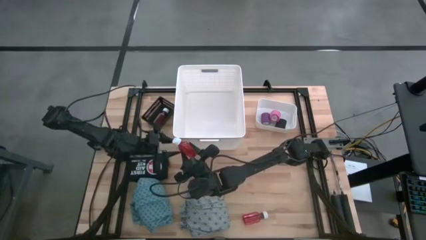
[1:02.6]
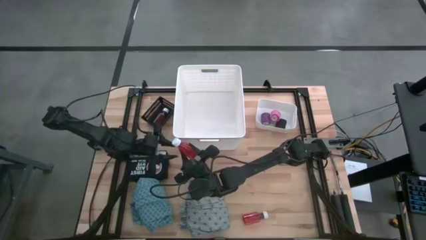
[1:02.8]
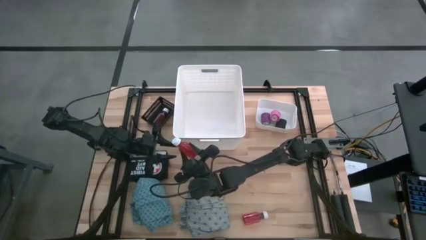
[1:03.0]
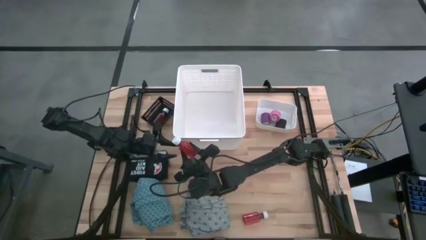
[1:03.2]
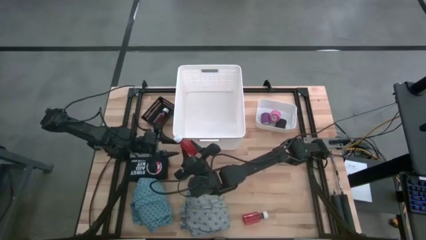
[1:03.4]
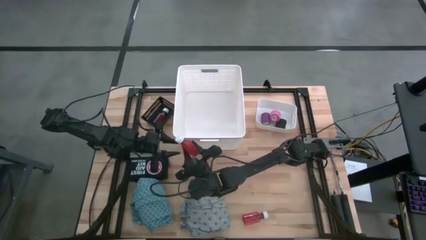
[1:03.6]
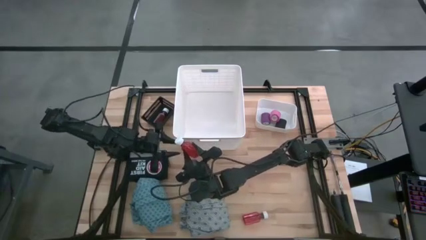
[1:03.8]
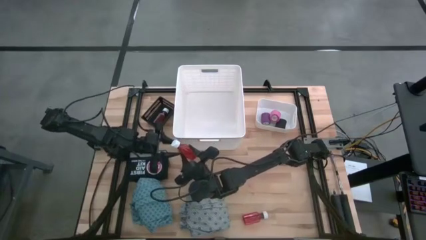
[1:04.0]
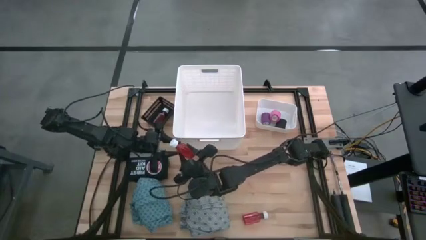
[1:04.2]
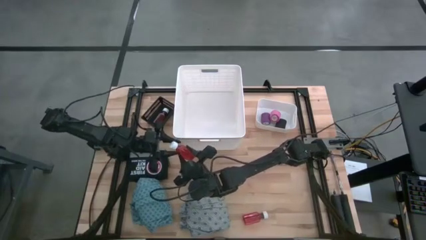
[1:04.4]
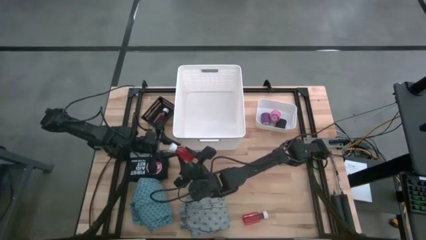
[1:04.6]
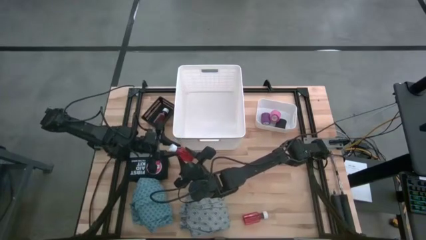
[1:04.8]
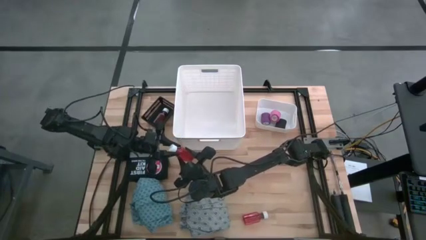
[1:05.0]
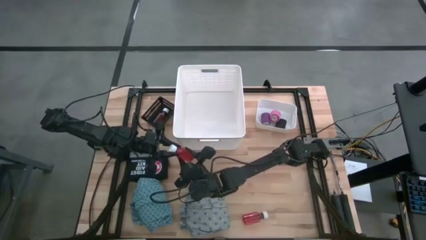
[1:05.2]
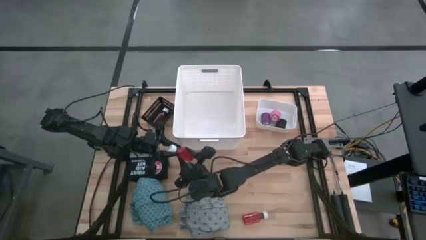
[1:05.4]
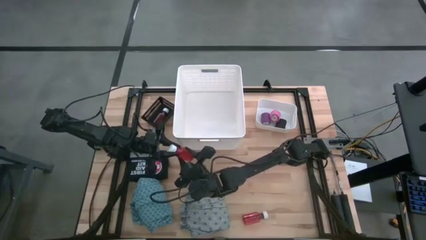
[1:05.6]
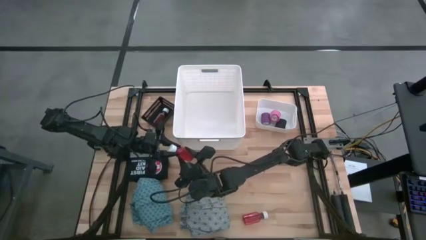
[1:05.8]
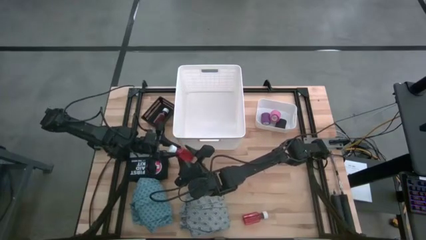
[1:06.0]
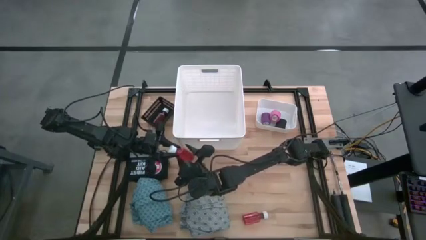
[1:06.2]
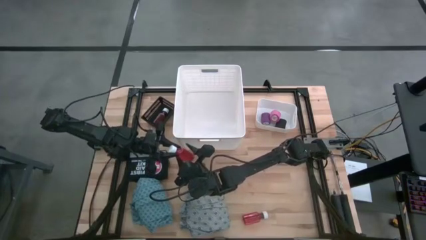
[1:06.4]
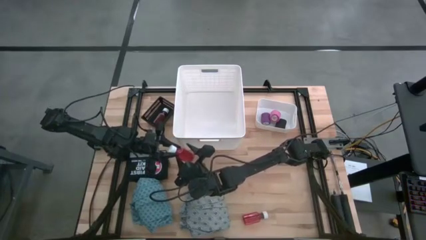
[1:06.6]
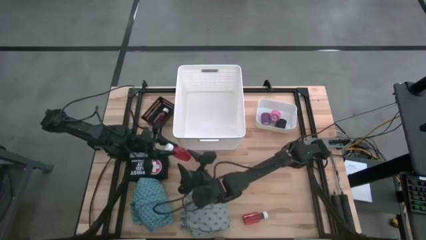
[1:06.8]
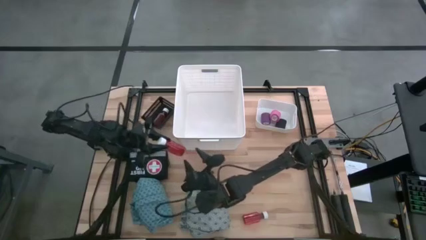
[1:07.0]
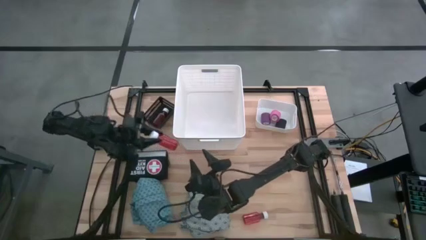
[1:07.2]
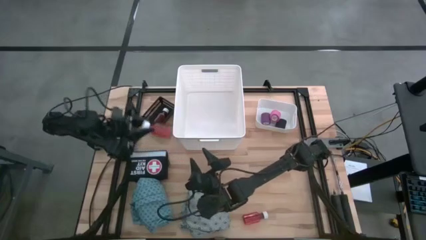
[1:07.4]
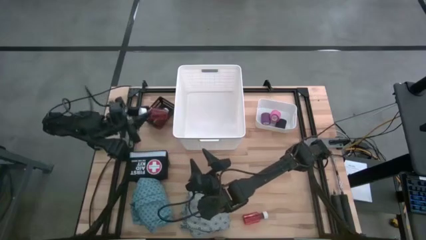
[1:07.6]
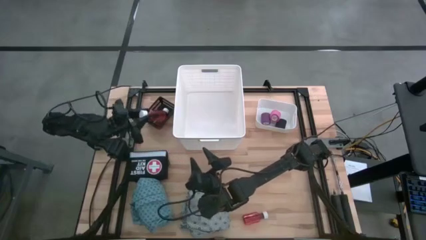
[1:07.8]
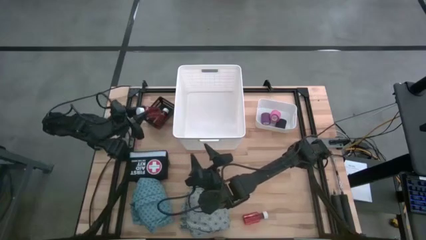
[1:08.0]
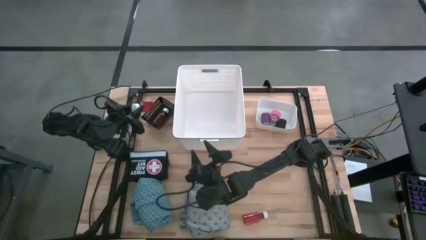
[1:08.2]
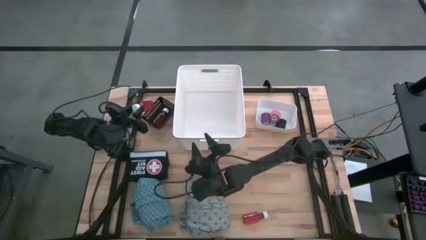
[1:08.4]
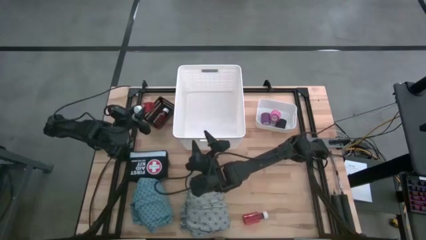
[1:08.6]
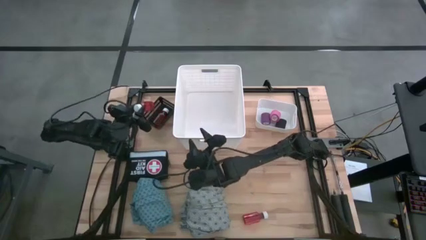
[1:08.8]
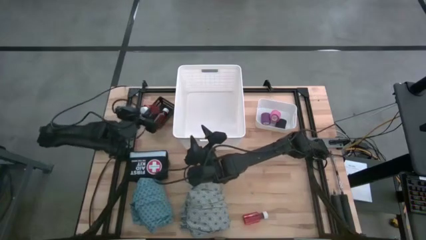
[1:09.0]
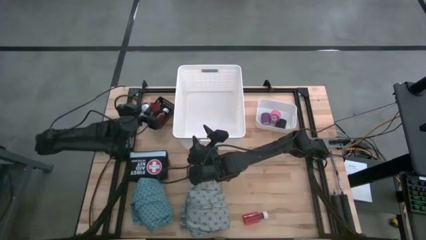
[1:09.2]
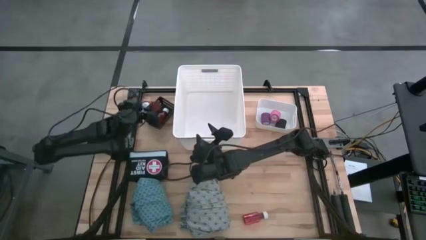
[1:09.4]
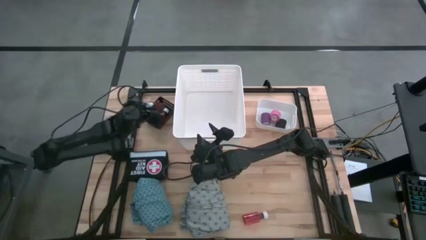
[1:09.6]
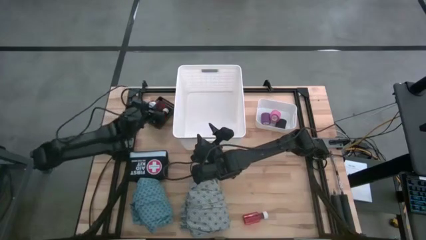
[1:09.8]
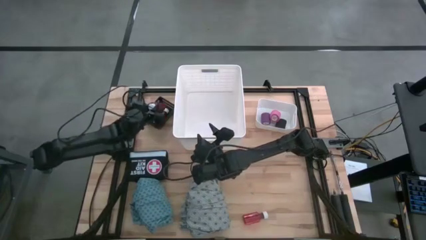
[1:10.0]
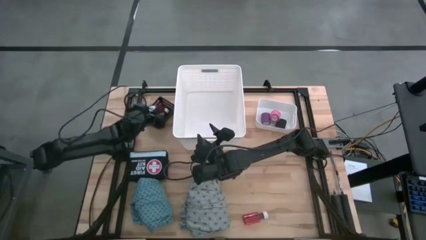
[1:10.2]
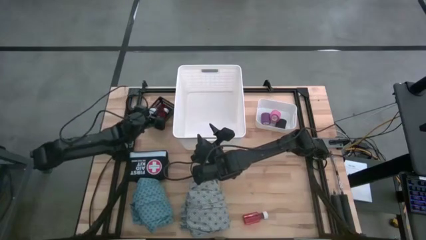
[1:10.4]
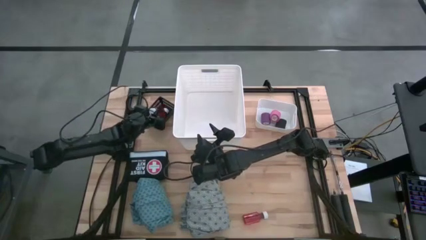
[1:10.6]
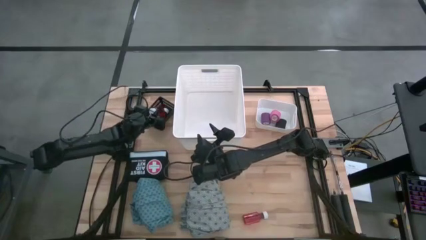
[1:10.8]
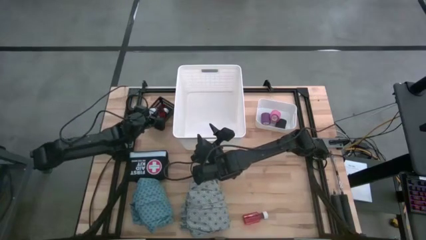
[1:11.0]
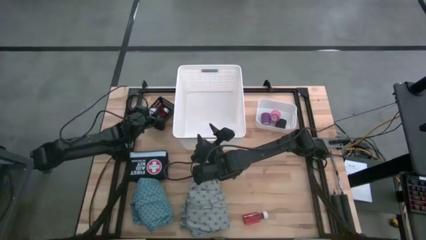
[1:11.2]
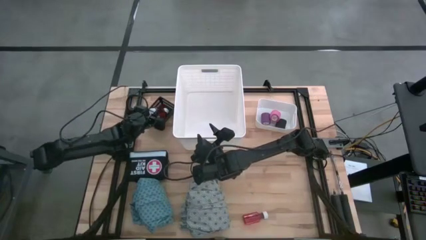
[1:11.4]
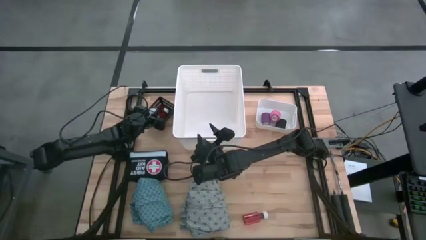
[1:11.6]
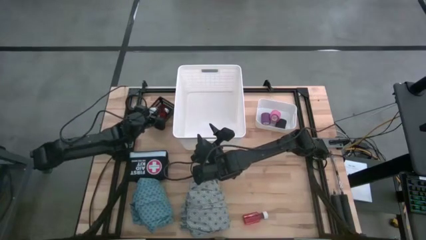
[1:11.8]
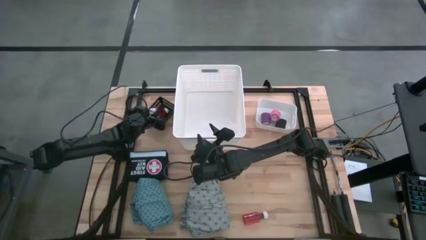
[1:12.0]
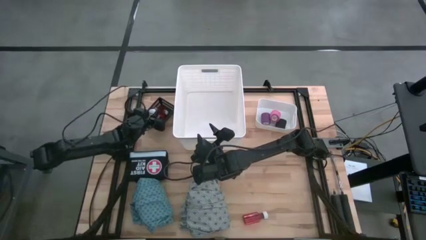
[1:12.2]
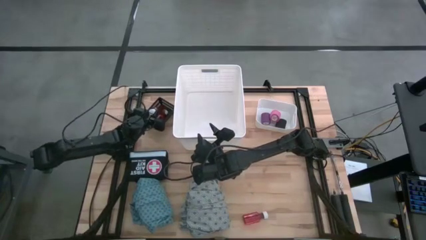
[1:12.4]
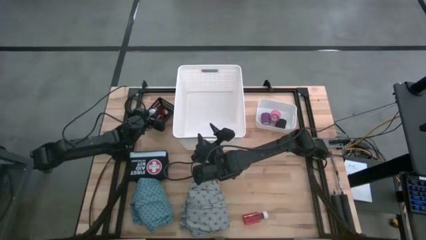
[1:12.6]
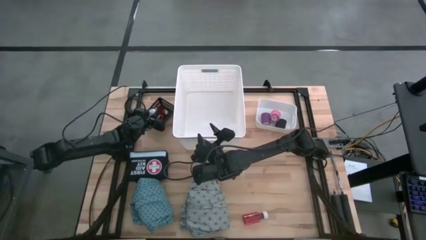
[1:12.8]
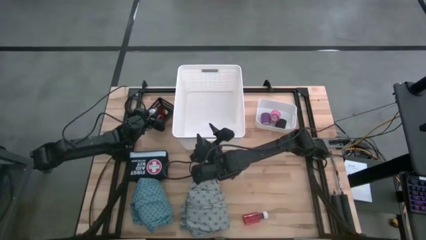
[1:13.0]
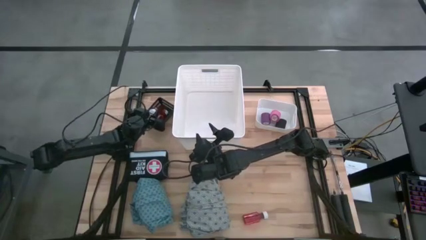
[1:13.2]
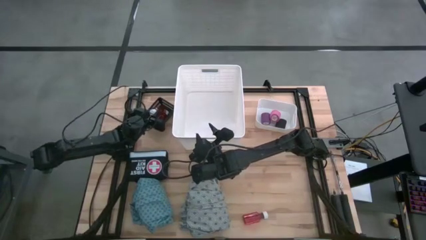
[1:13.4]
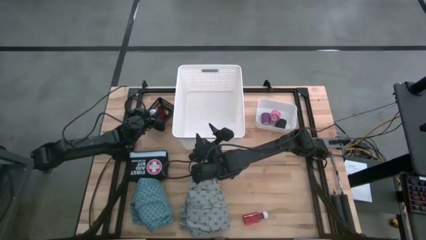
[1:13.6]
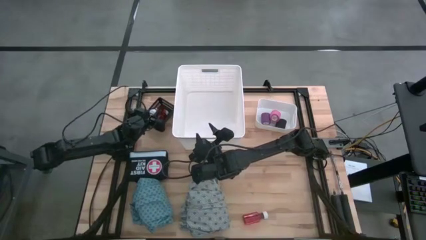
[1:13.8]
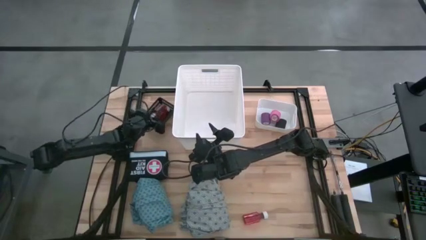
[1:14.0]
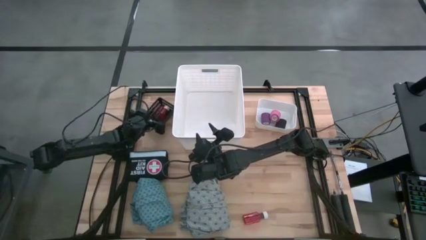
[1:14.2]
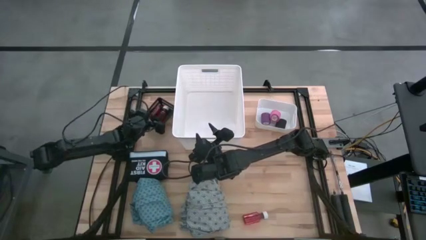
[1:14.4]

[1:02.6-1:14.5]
Task: Pick & Place Medicine items
Put the top red medicine bottle into the black bin
